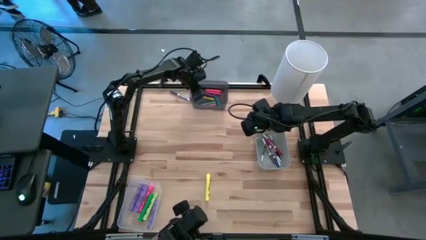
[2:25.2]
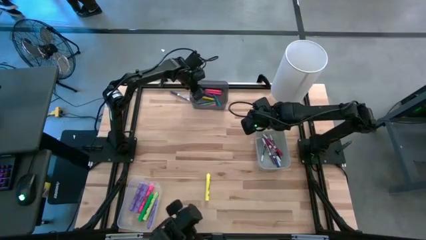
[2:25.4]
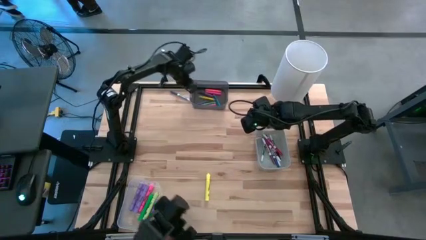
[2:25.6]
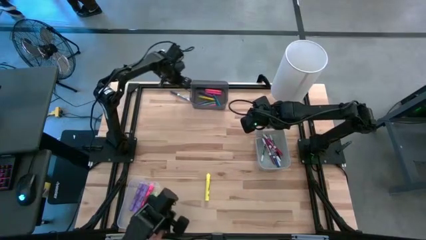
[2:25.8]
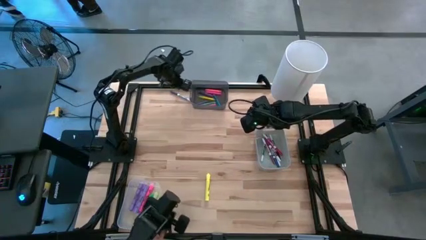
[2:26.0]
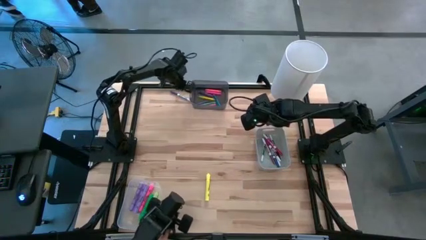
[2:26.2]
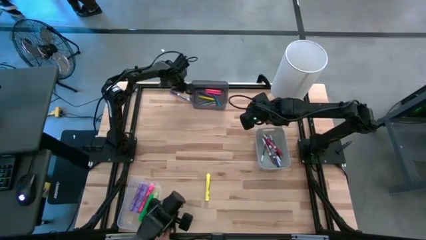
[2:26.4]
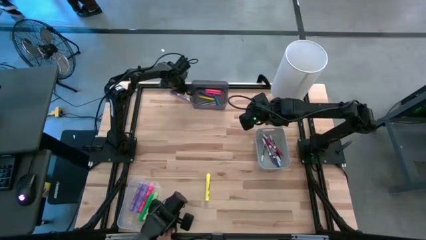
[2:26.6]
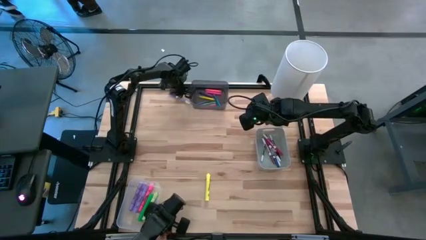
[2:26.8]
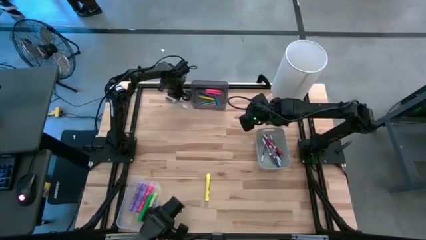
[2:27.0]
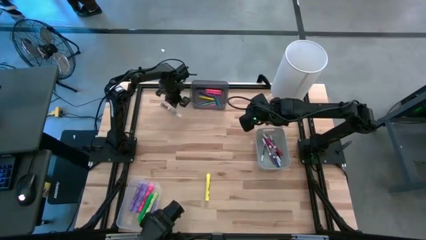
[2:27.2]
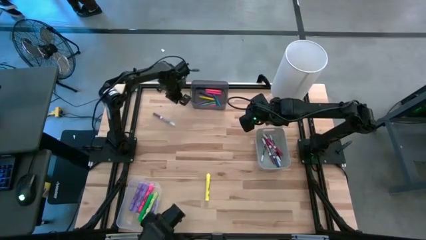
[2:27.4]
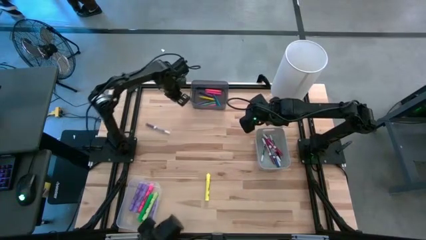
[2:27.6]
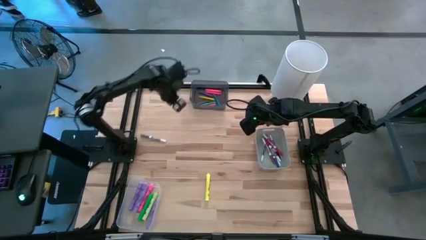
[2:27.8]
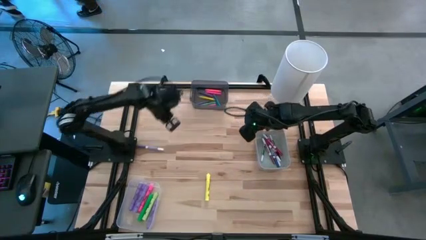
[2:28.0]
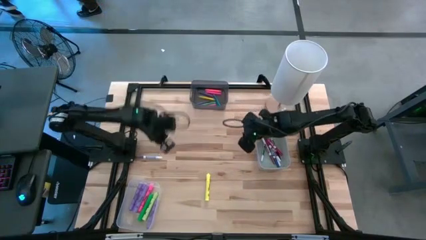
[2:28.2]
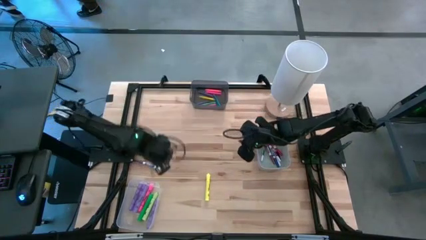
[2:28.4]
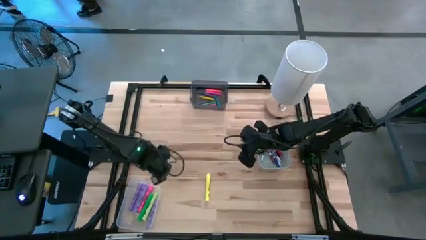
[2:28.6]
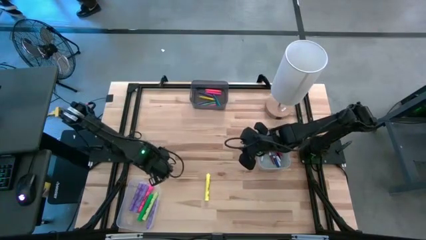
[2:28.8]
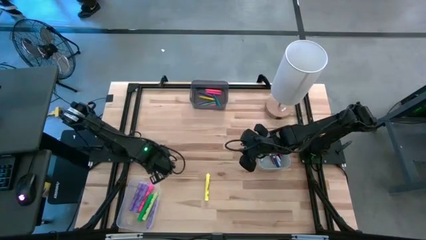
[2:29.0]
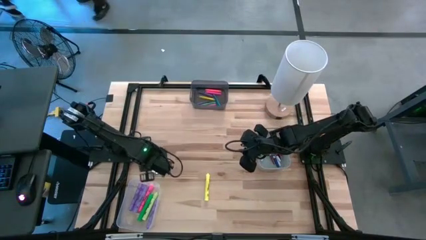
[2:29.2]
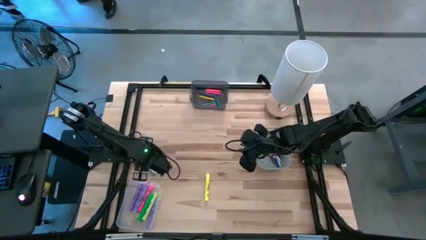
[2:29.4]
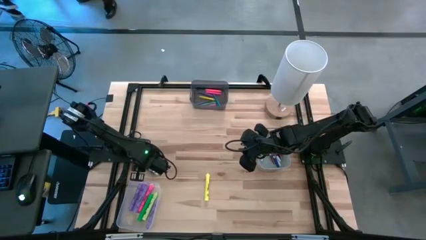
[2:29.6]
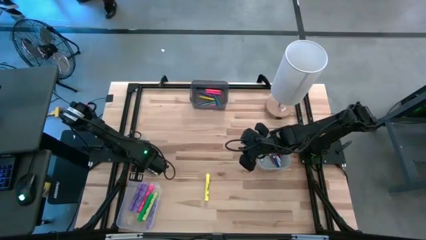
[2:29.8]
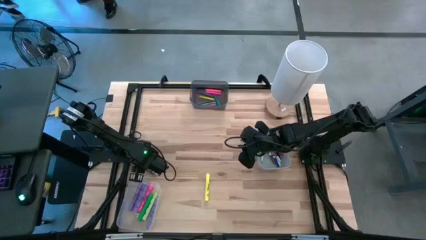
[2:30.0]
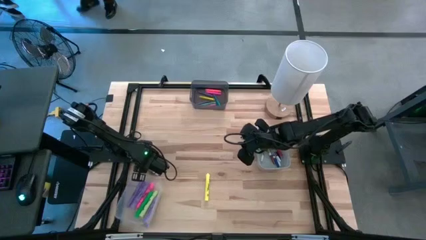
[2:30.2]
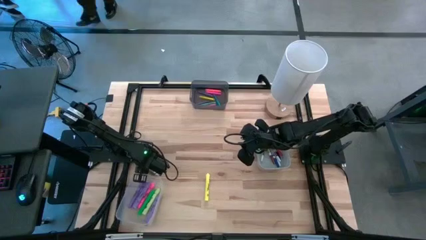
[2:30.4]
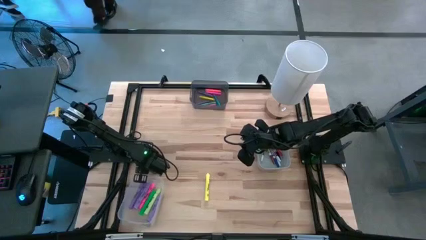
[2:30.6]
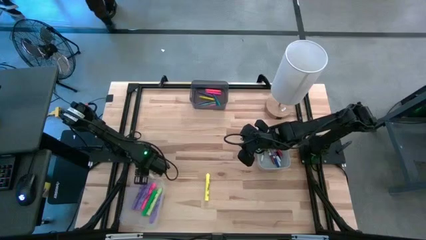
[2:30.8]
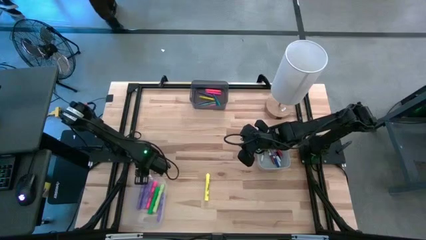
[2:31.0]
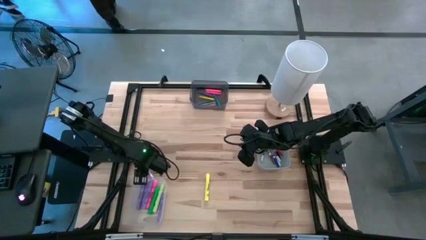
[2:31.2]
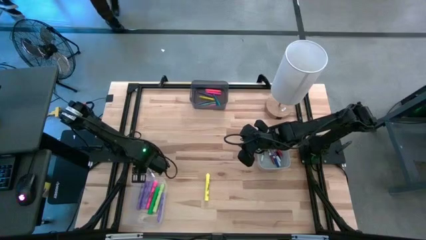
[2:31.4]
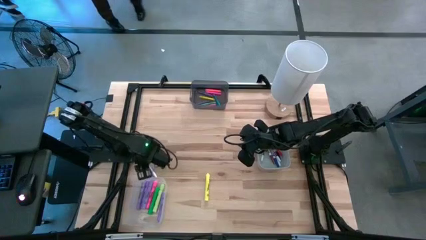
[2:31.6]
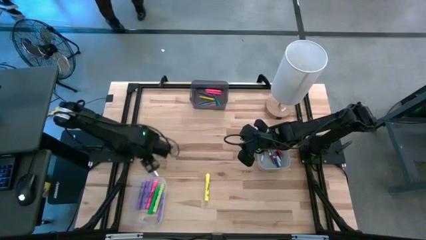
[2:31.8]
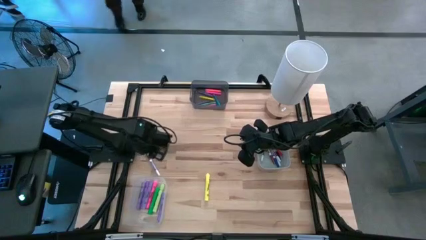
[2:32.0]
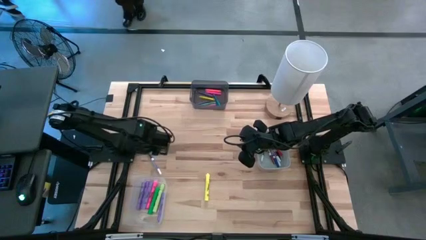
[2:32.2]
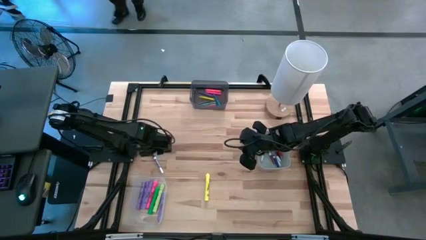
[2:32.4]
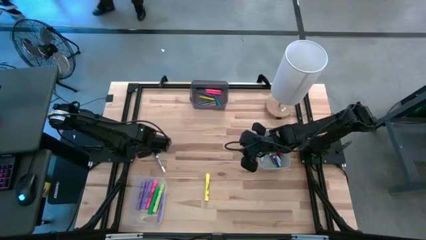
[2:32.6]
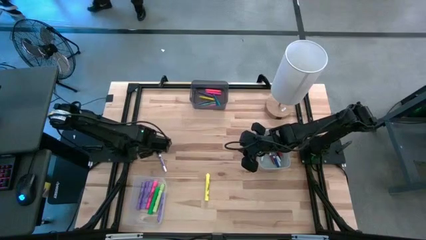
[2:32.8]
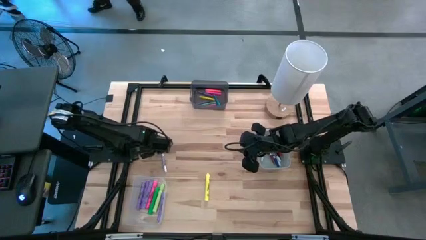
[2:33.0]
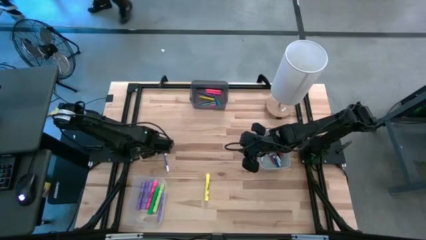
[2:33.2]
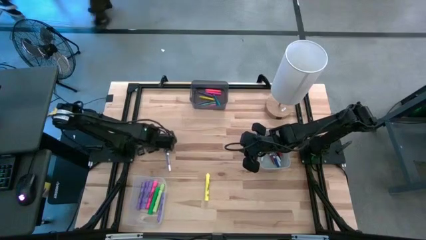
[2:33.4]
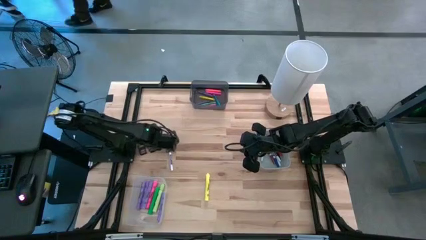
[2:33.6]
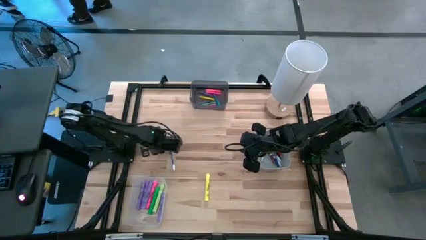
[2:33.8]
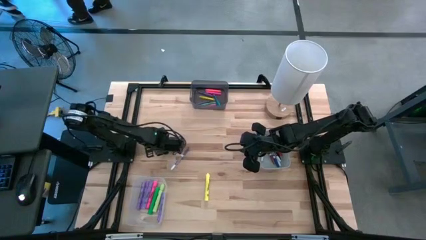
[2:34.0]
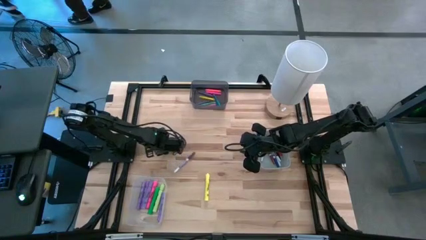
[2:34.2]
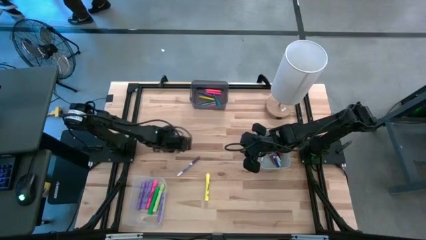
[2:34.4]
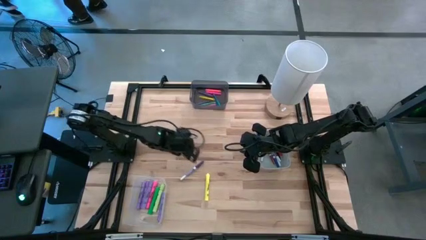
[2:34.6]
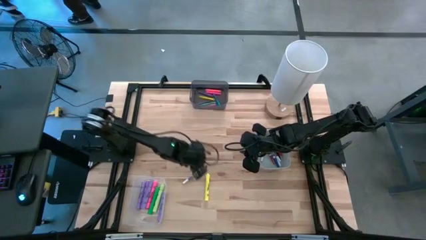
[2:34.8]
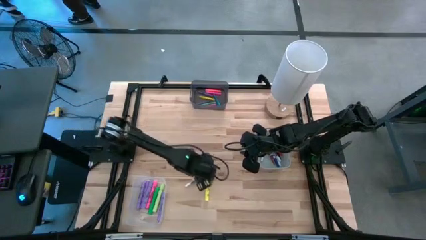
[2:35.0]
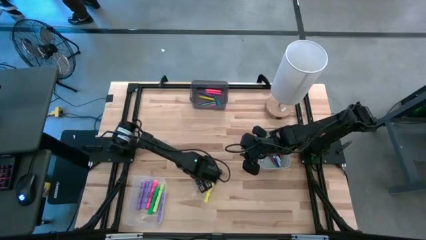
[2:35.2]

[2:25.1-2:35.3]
Task: Pick & Place Markers
Put the blue marker pen into the gray bin

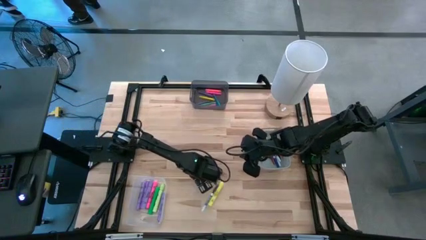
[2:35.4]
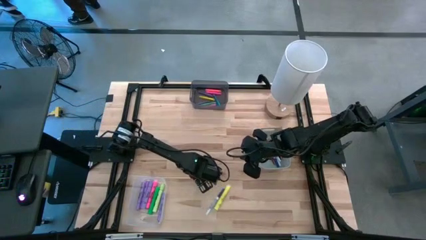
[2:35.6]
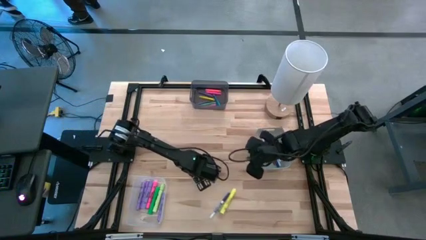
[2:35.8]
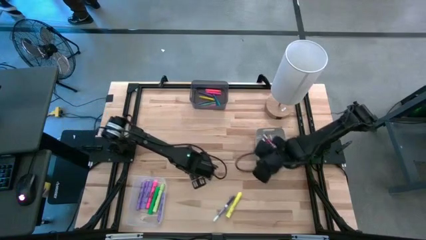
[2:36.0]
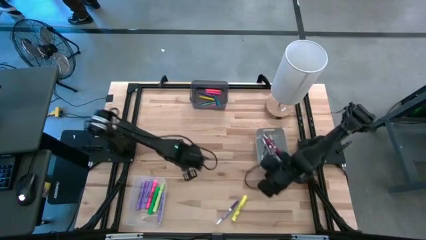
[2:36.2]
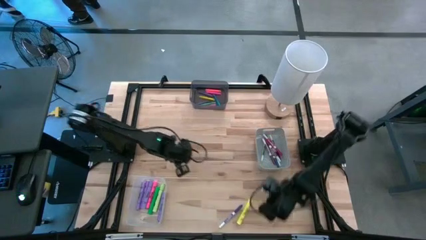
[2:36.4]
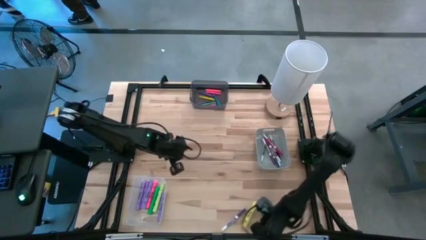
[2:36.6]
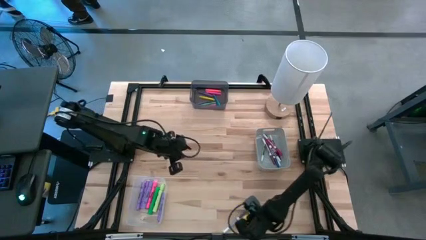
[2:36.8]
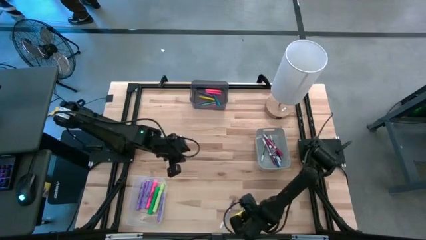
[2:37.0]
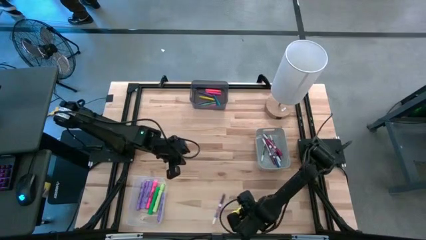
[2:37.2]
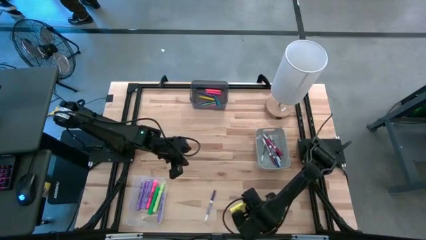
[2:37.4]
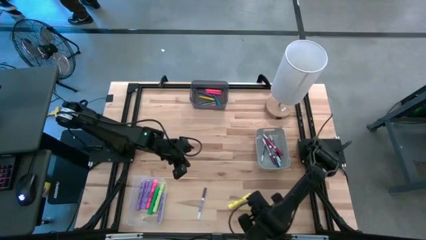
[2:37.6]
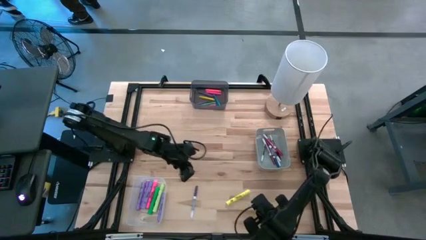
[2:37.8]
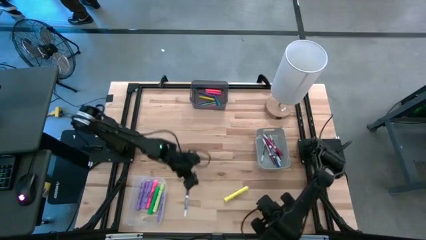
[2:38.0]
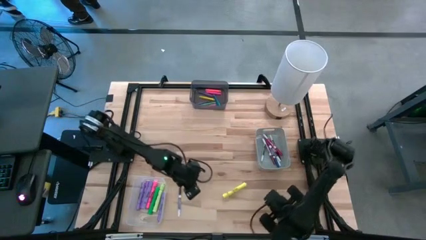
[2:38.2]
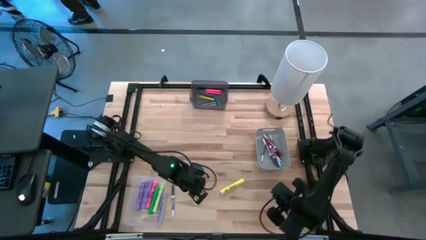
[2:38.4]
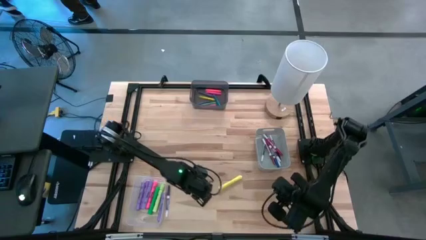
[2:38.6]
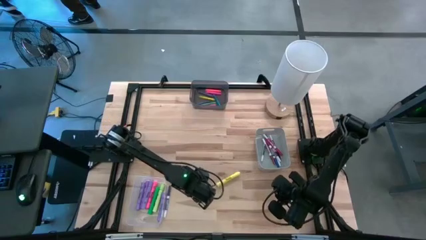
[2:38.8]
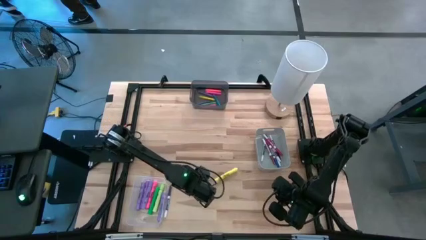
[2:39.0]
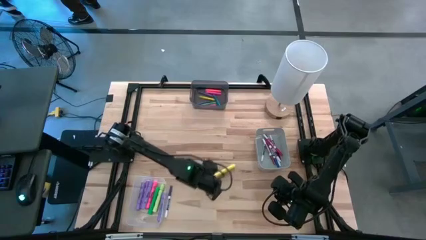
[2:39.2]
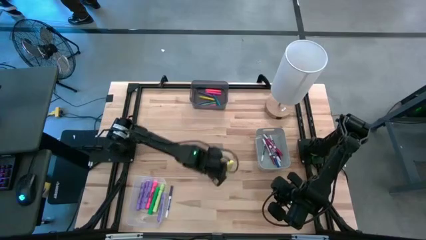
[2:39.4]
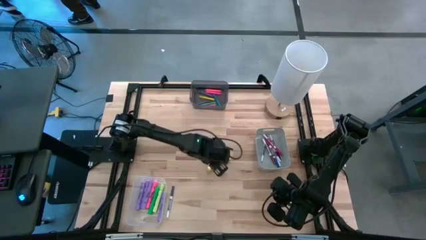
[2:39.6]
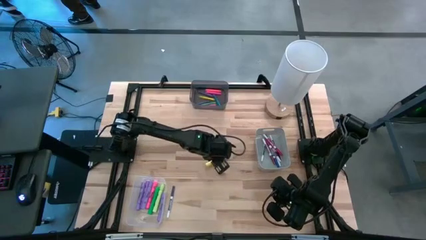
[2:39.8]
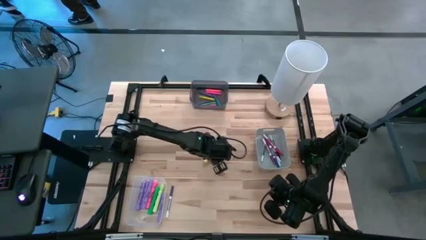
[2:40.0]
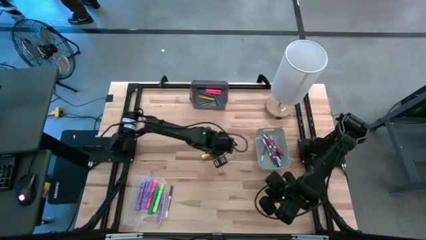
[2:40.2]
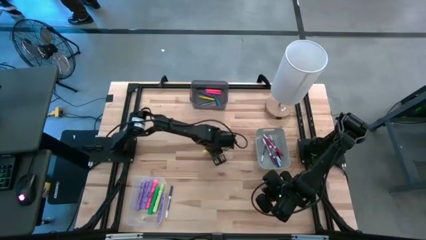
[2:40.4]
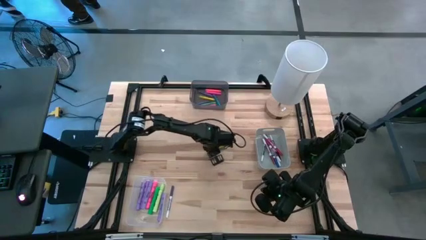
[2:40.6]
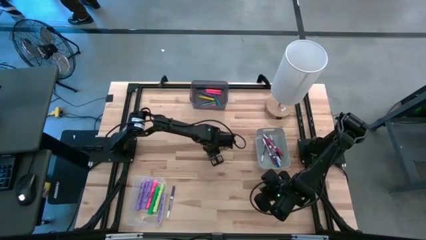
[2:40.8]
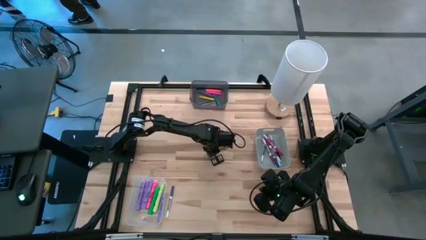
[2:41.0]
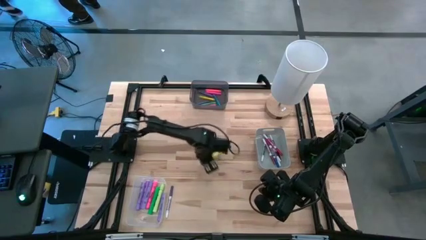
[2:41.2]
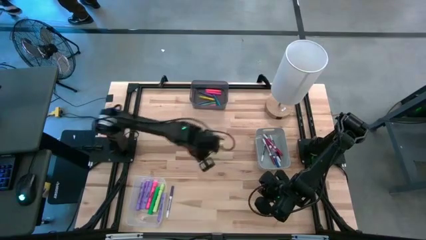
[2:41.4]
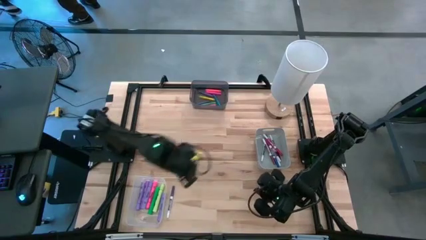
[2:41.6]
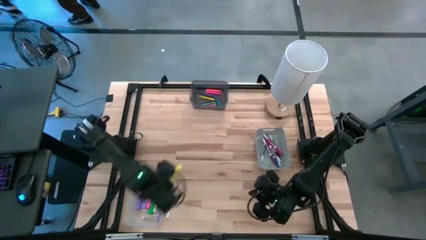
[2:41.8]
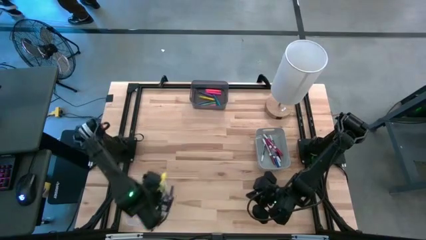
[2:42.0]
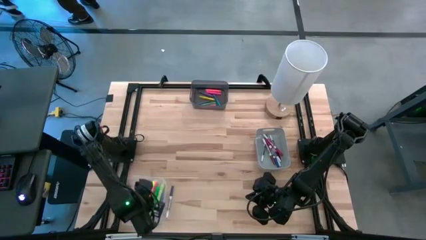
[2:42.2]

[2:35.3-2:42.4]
Put the yellow highlighter pen into the transparent bin
